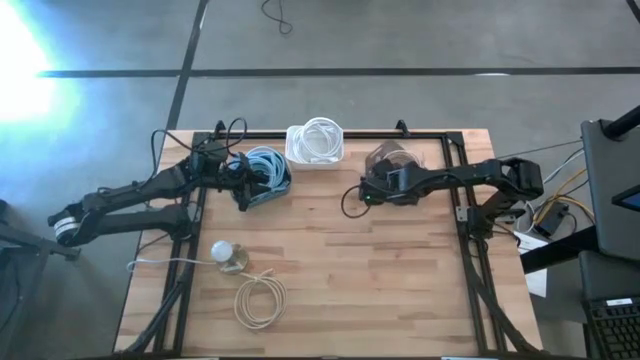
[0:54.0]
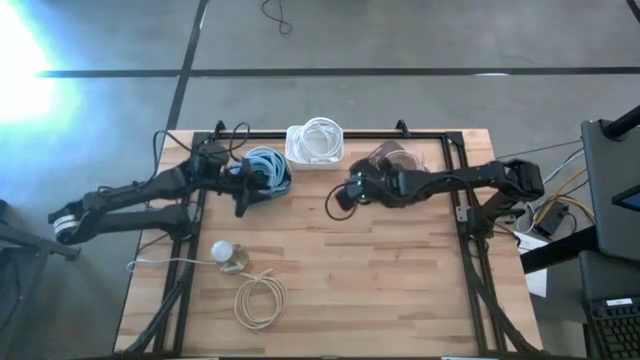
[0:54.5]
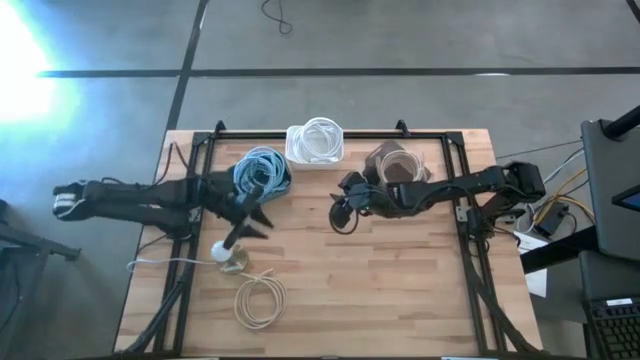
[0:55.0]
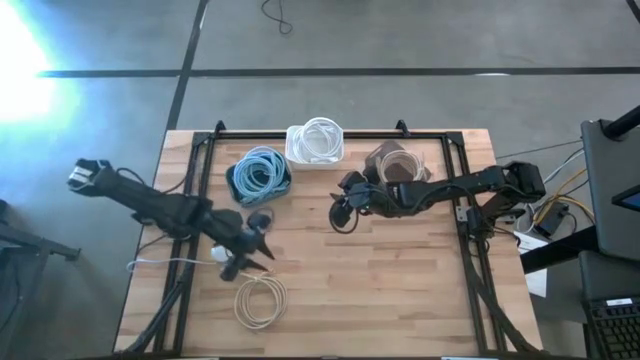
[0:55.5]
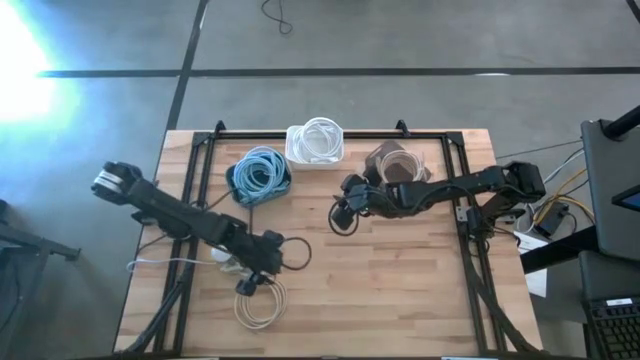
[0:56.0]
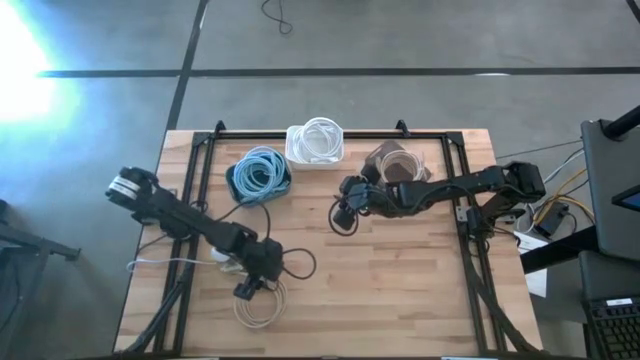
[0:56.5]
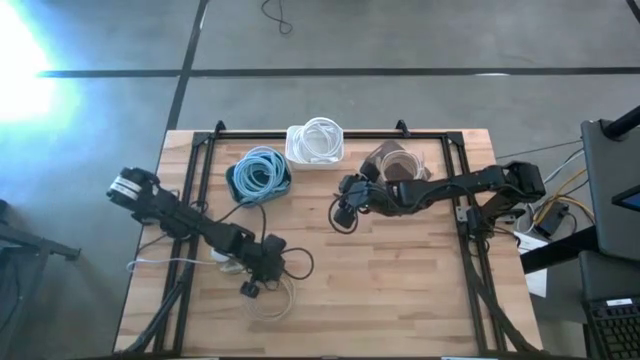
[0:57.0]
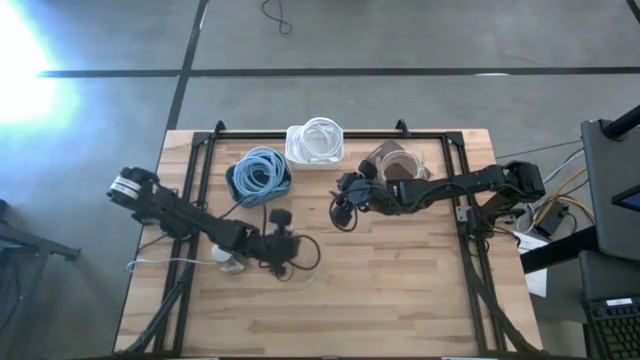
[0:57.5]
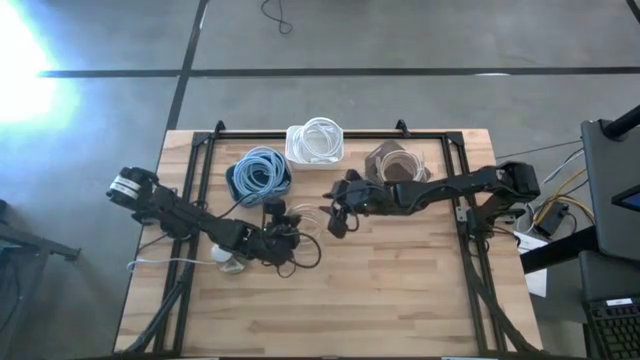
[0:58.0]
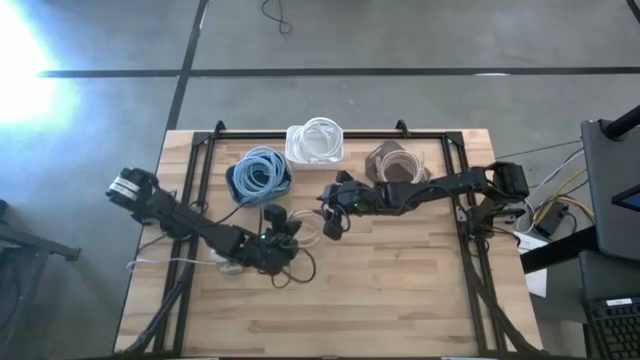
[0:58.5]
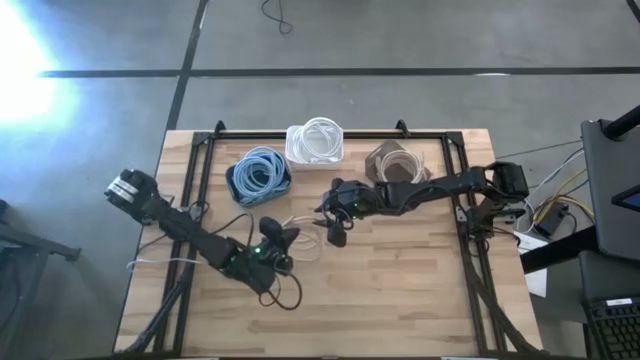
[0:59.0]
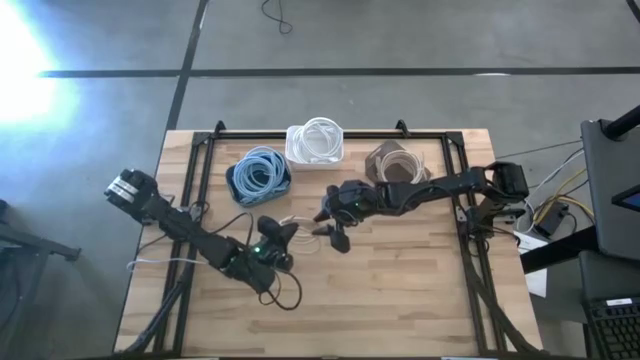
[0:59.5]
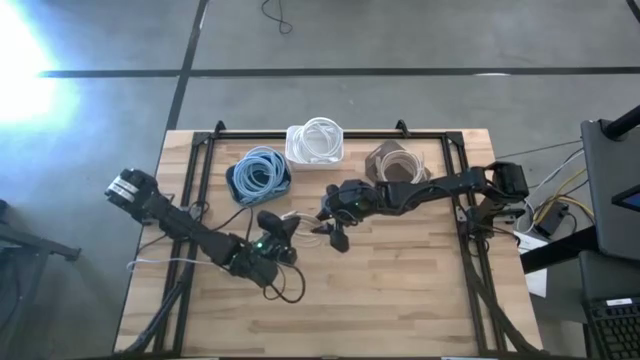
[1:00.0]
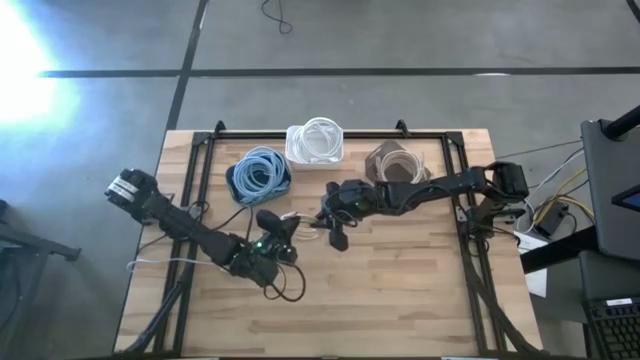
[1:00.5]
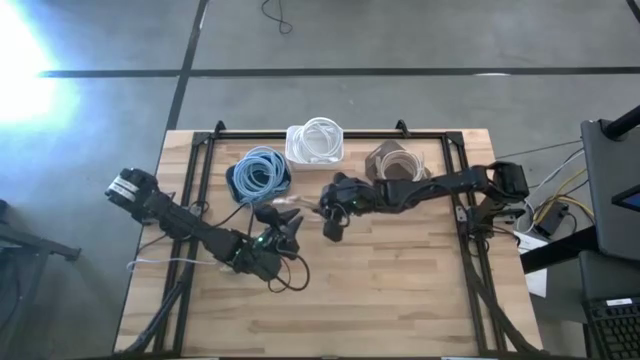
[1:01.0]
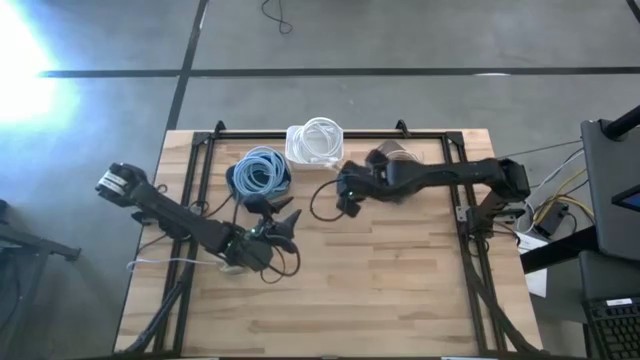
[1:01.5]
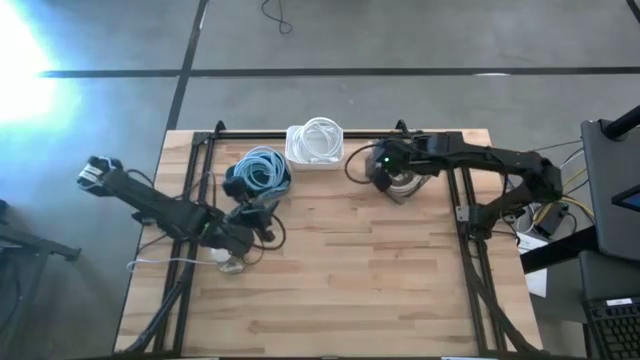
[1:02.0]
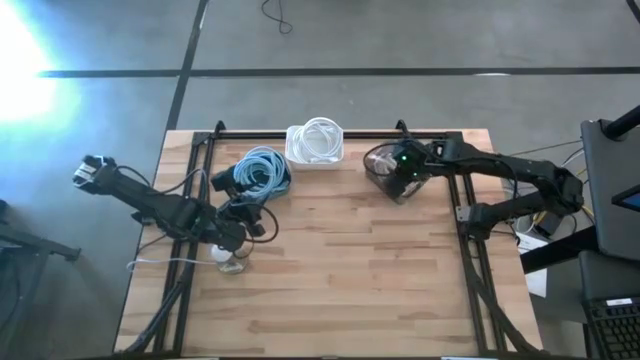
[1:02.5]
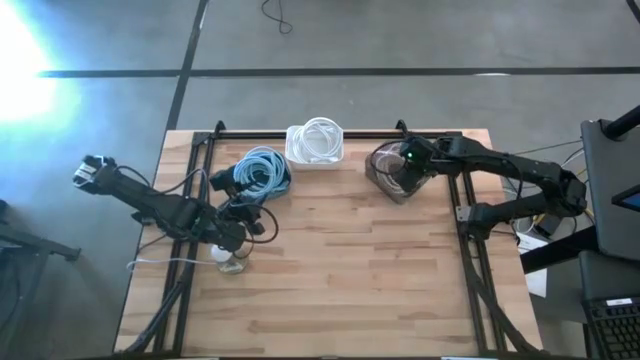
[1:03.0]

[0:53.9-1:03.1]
Task: Sort HDMI cables
Put the brown HDMI cable into the black bin

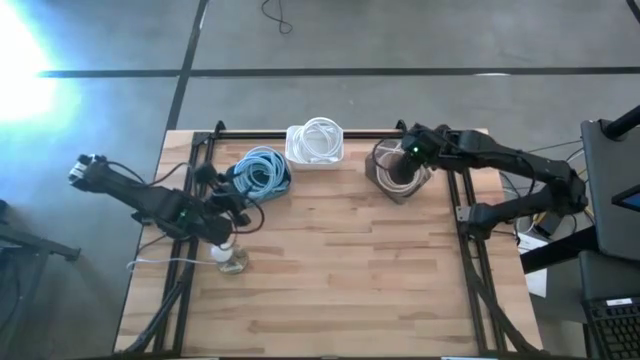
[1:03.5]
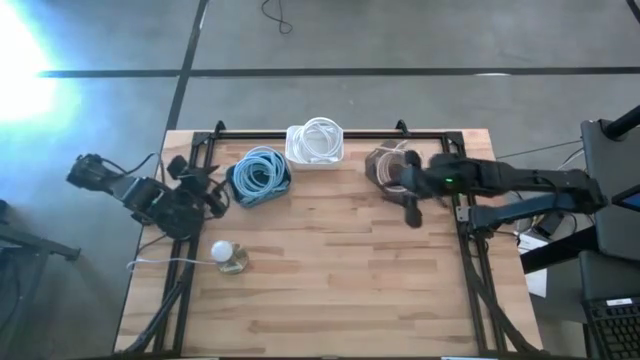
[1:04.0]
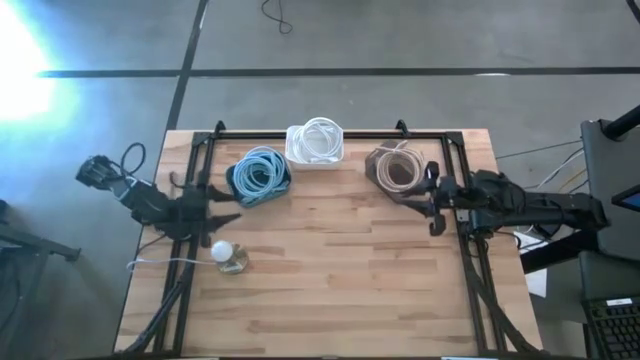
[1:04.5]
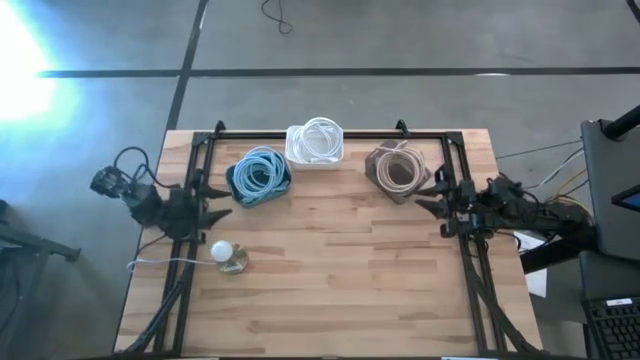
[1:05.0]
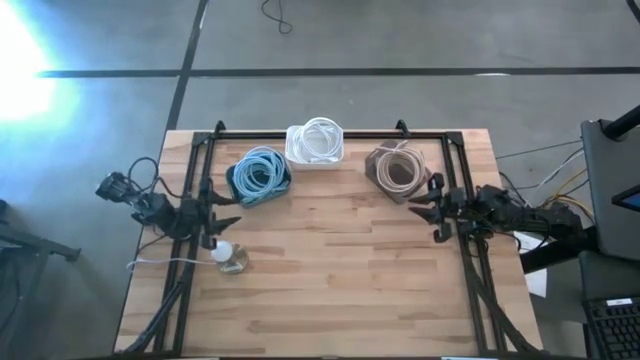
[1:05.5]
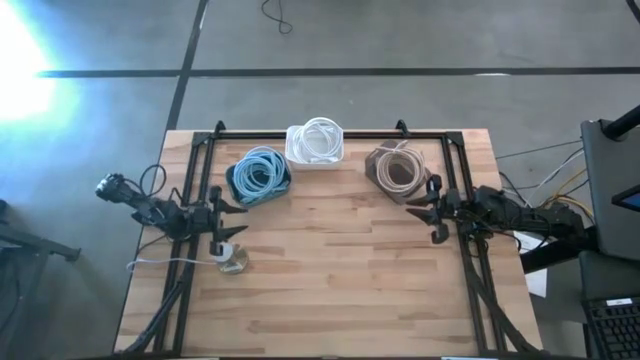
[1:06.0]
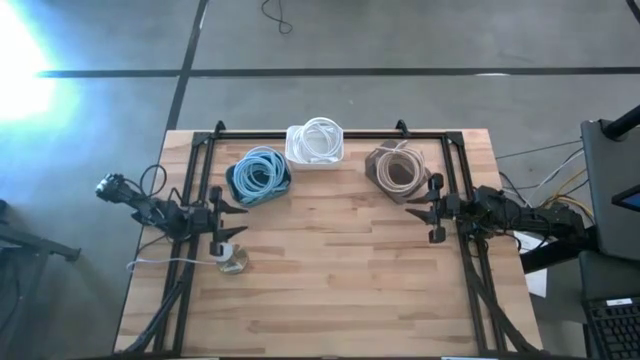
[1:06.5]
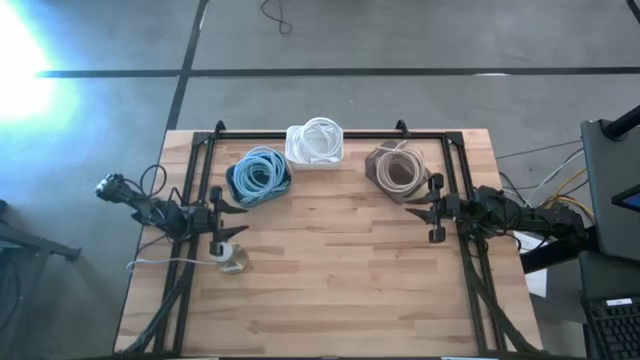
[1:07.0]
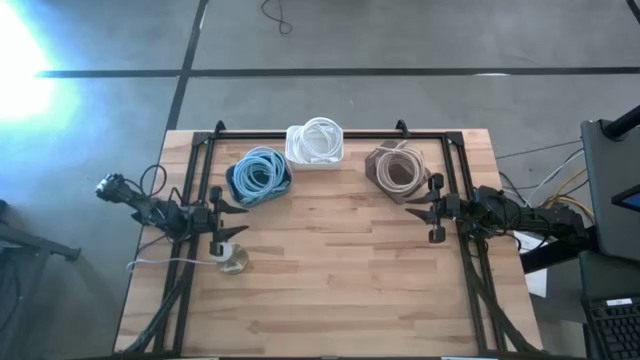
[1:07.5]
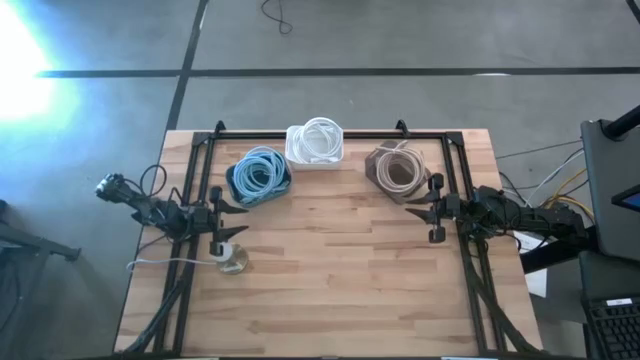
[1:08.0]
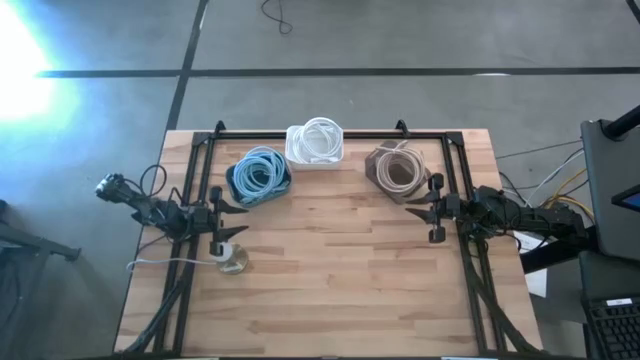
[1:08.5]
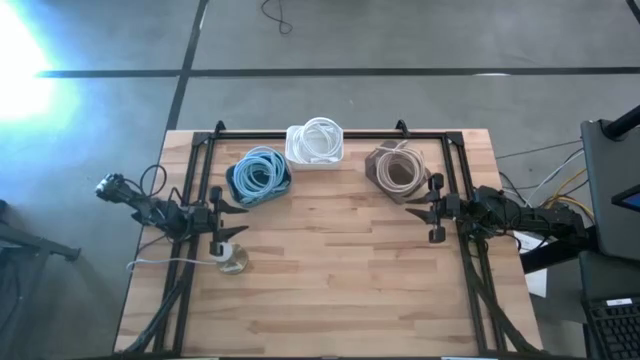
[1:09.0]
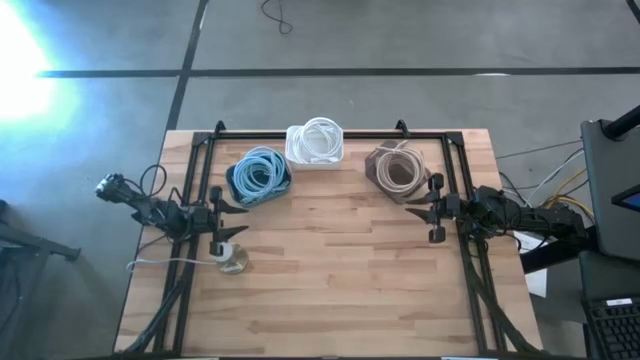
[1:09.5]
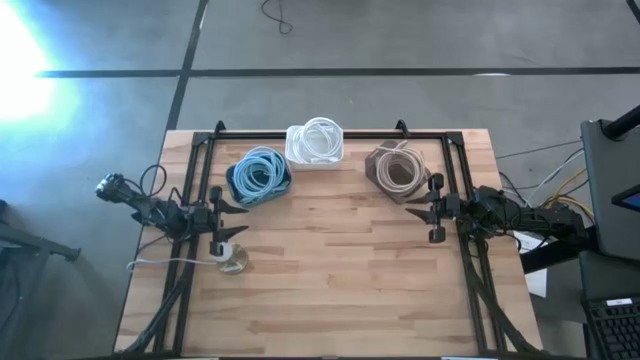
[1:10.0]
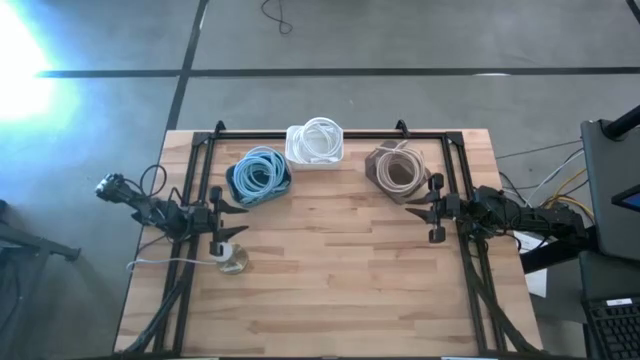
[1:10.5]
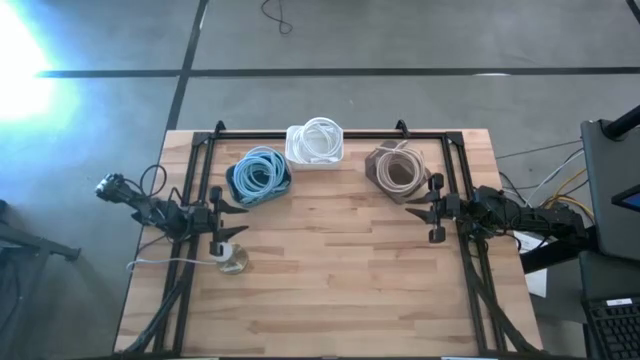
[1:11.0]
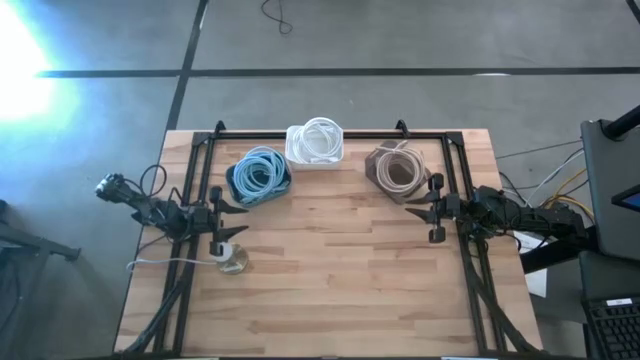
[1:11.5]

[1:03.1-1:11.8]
Return to Home Position

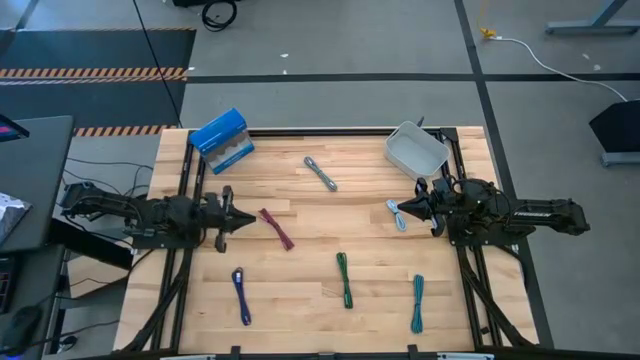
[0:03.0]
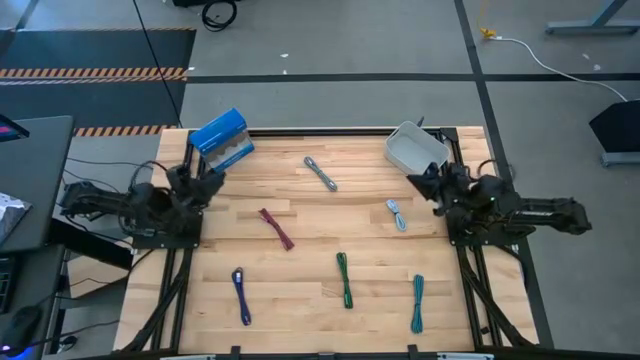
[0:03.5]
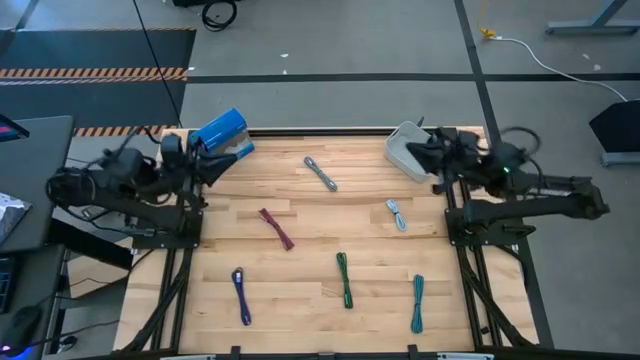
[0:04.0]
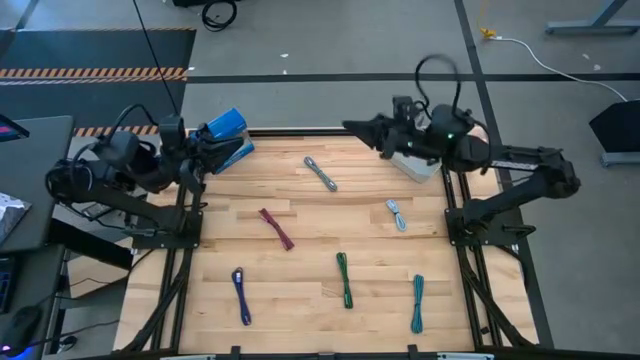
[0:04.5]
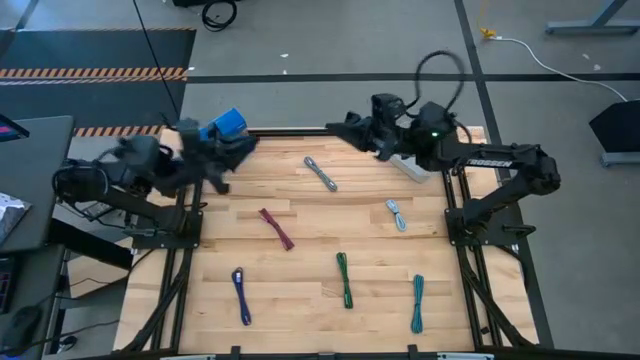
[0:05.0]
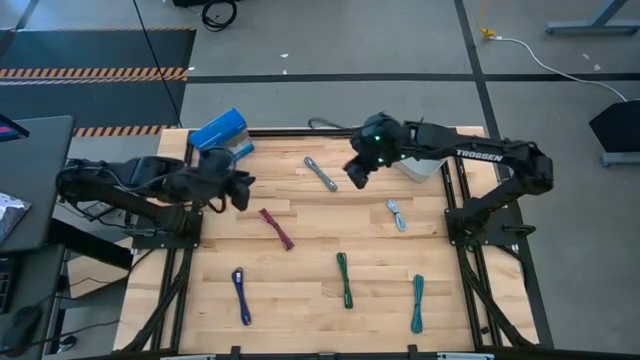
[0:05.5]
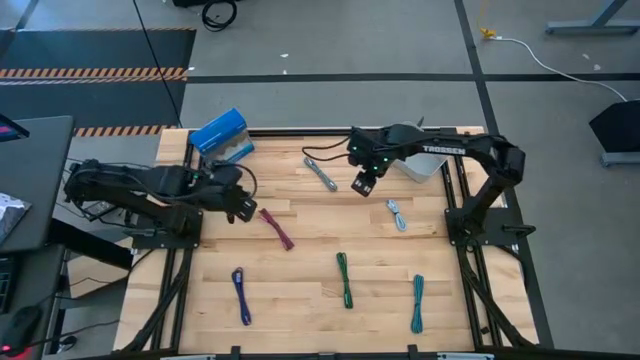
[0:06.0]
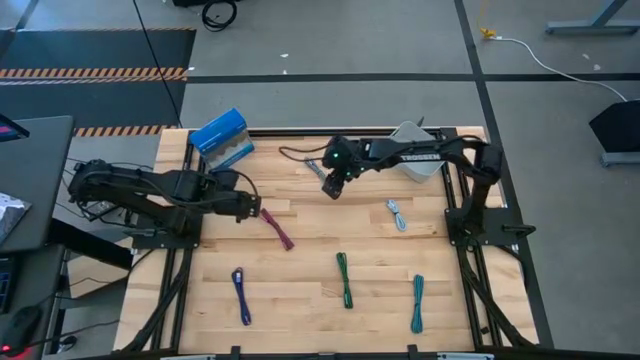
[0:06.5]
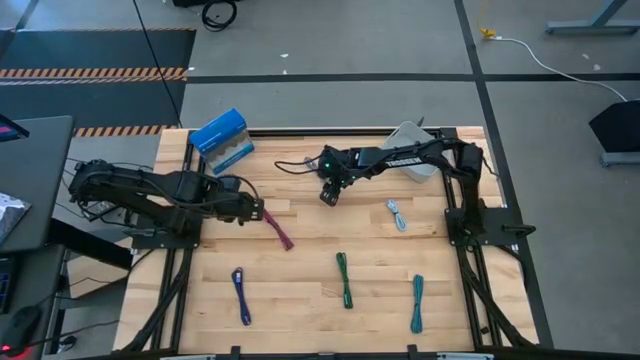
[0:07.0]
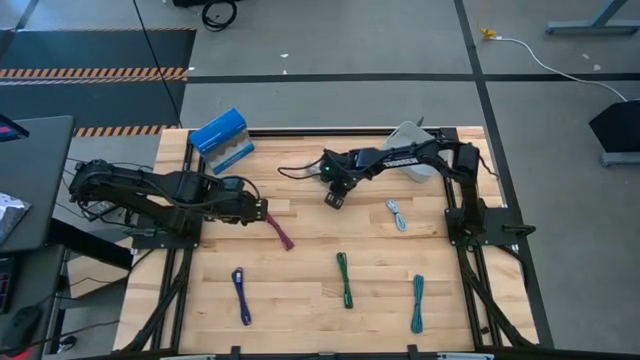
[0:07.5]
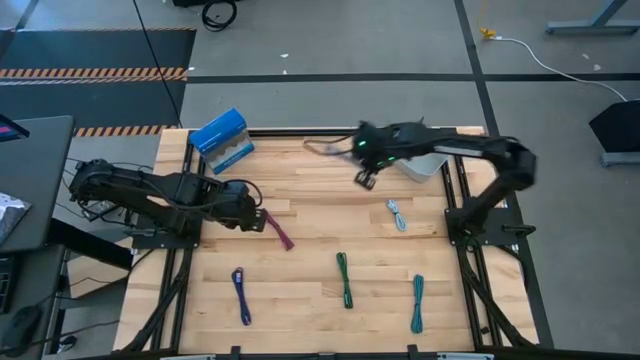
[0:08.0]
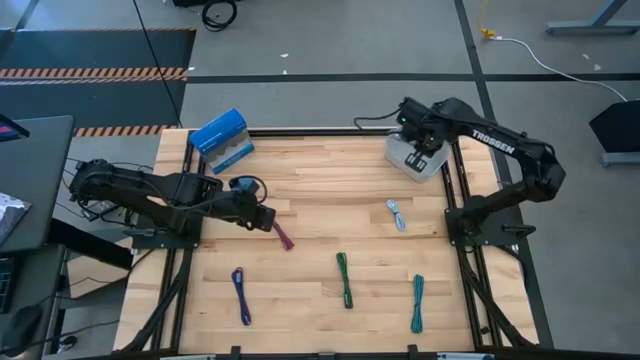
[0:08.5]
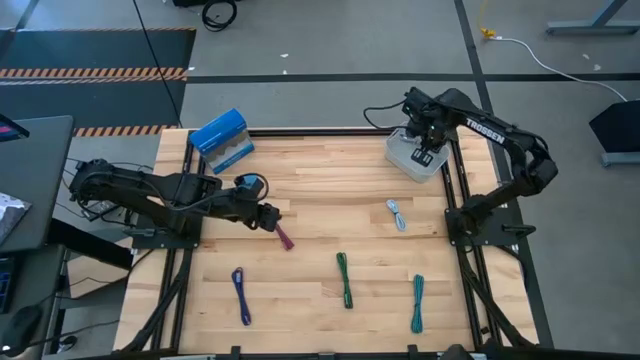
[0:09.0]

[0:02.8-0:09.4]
Task: Pick and place USB-C Cables
Put the ziptied USB white charger cable into the bin
